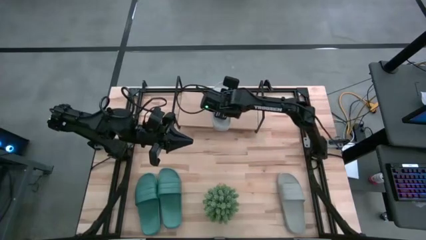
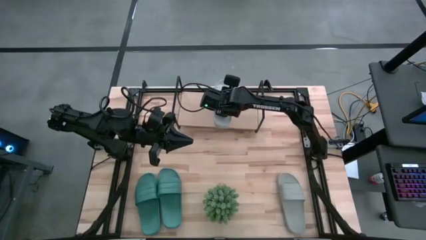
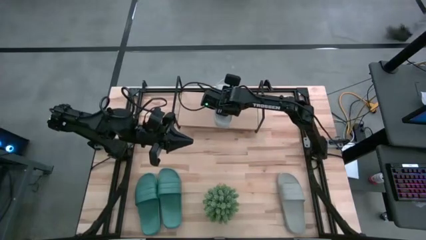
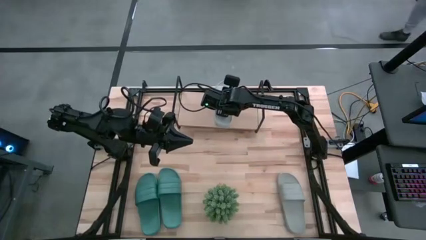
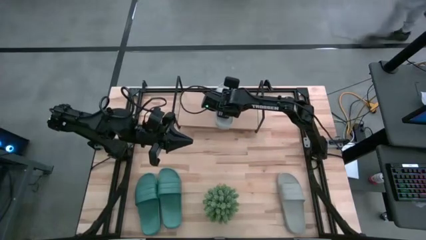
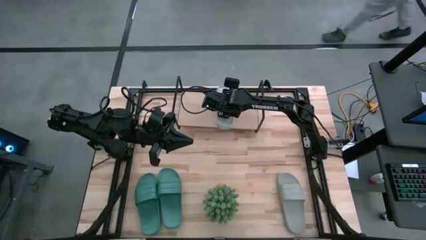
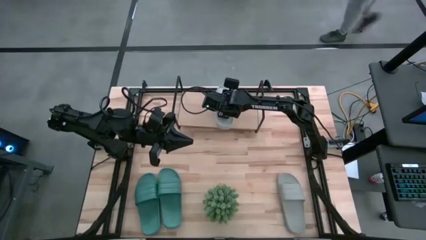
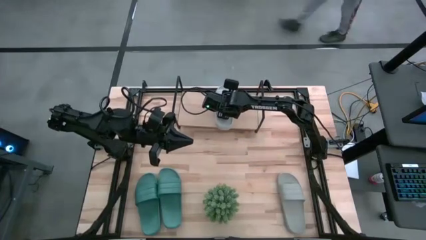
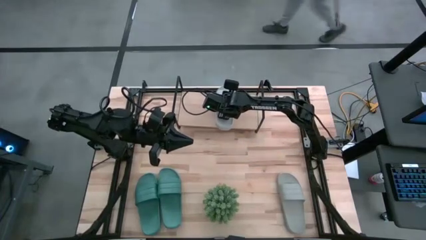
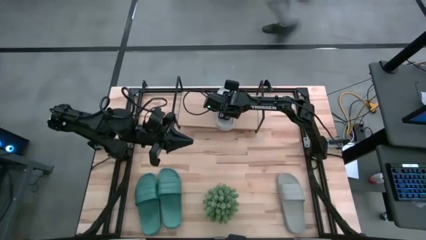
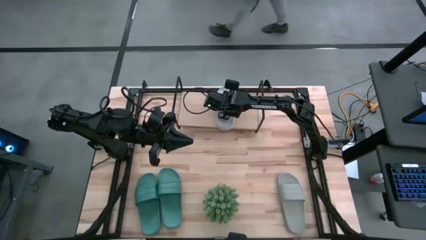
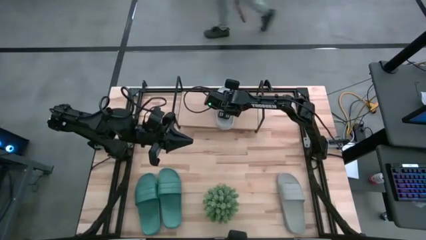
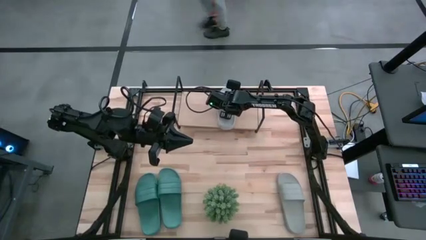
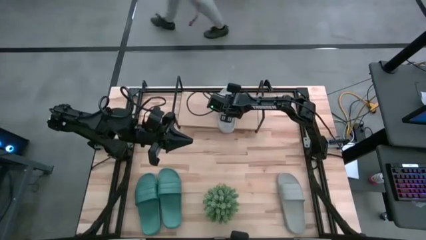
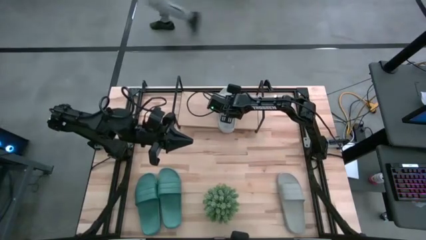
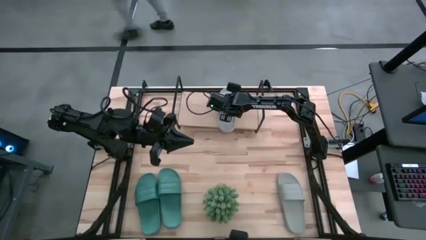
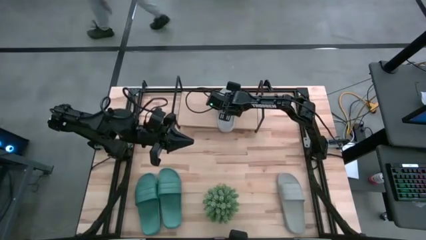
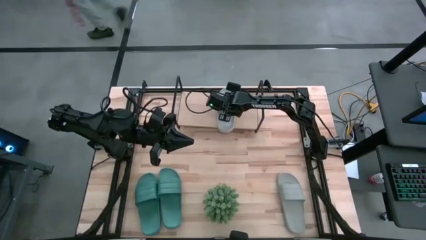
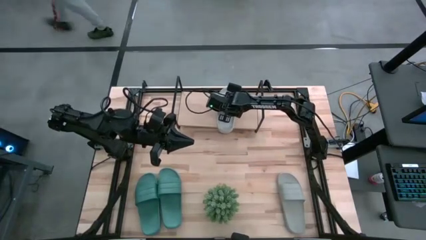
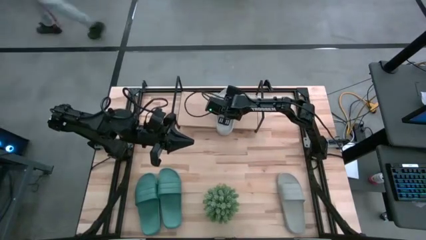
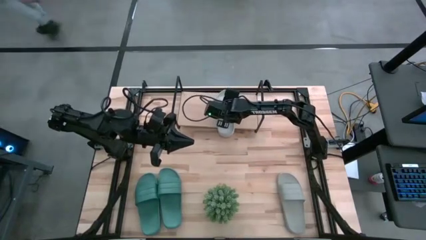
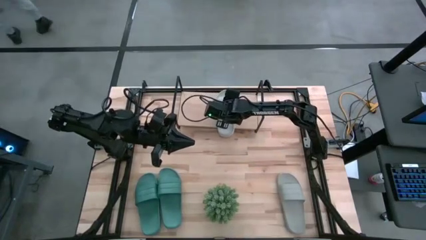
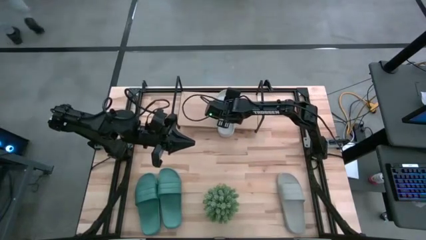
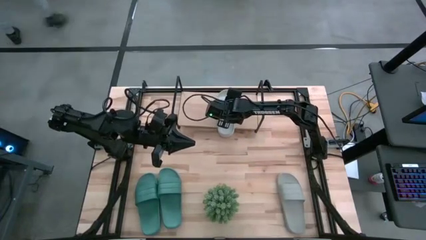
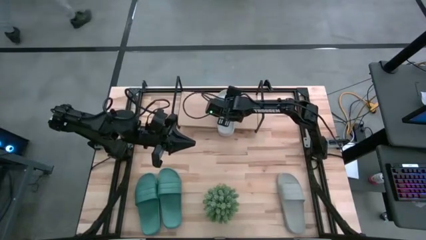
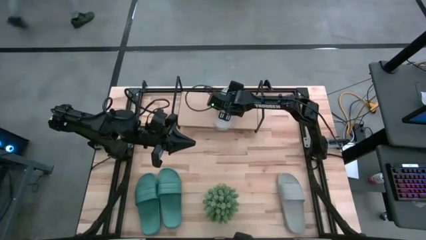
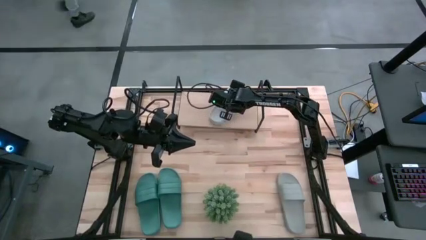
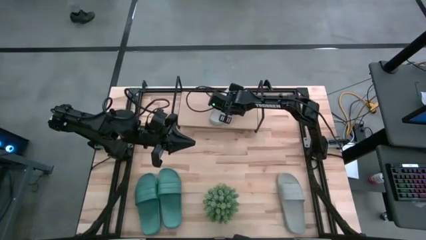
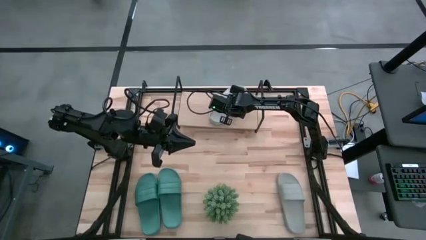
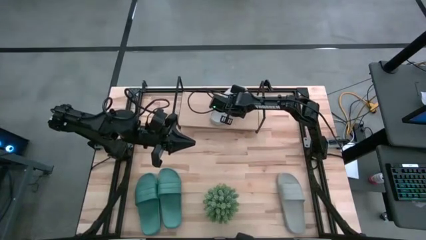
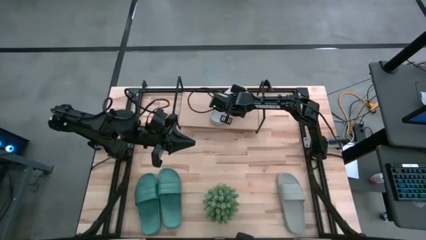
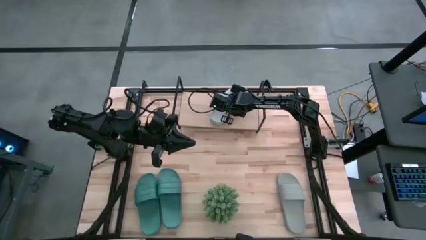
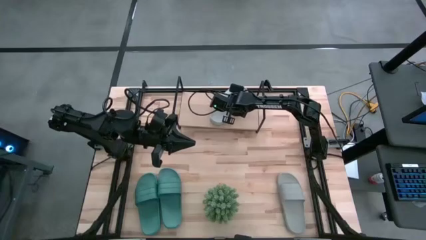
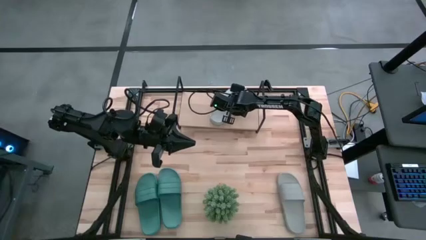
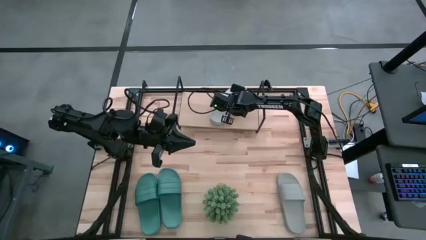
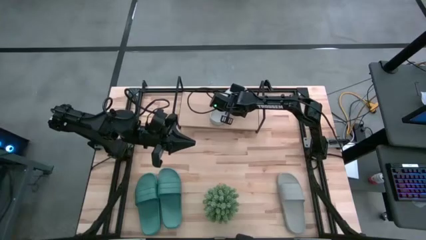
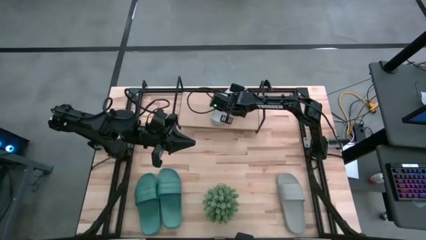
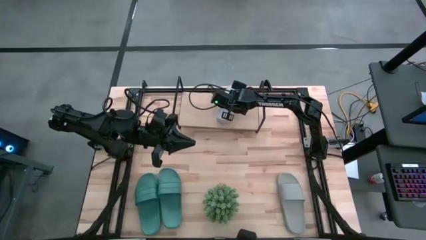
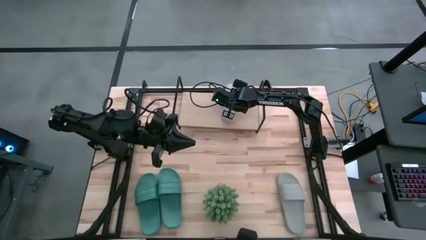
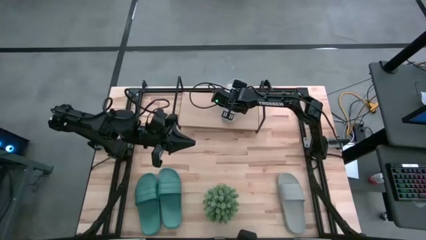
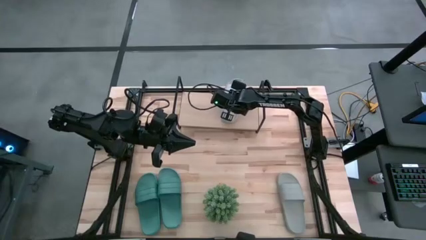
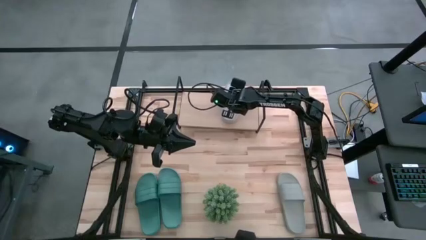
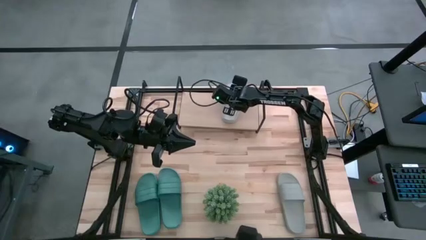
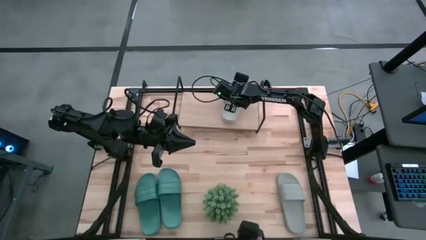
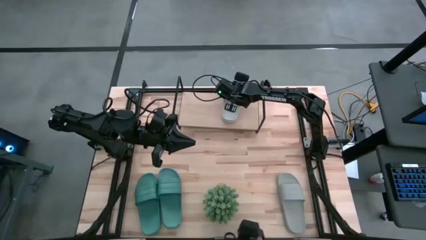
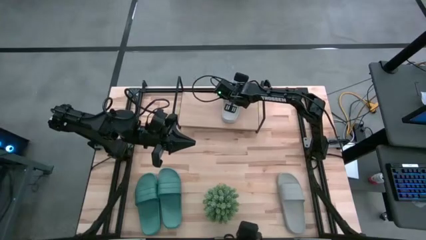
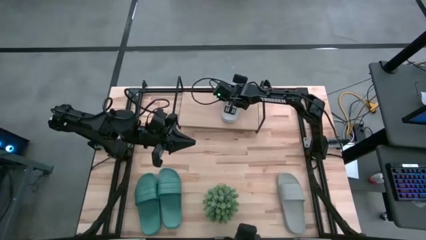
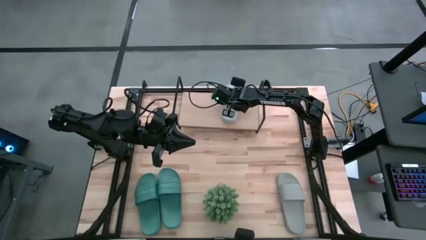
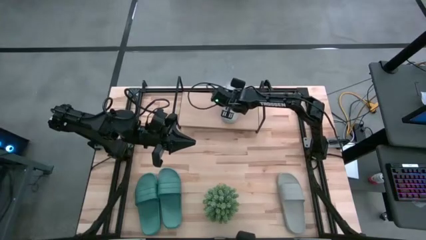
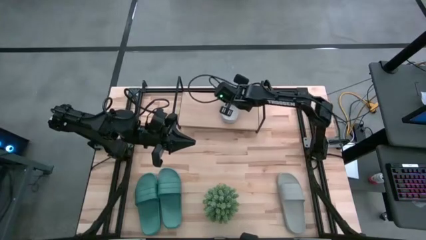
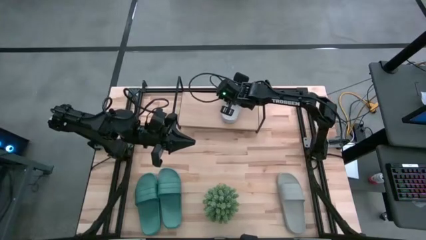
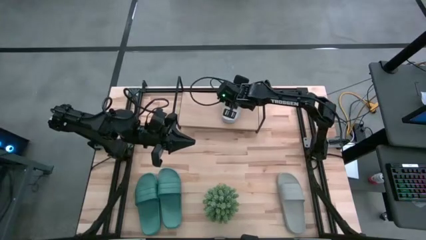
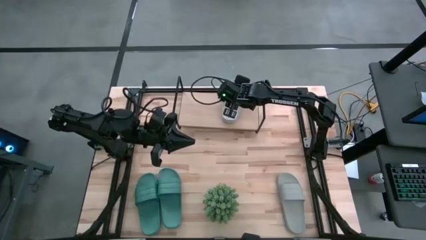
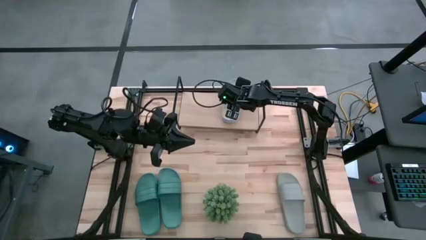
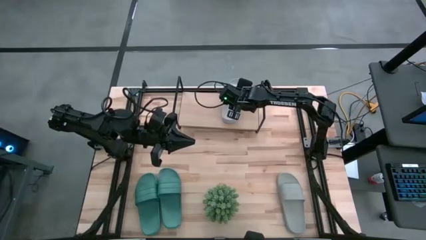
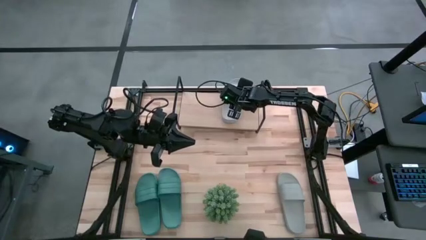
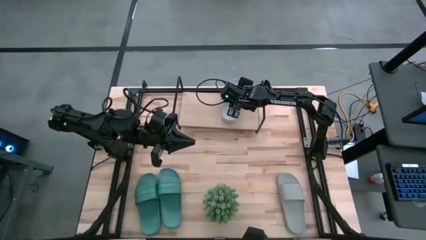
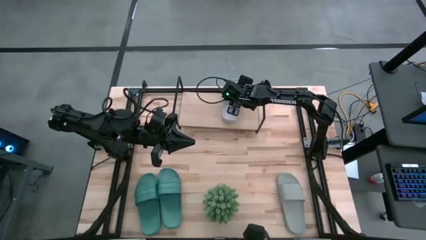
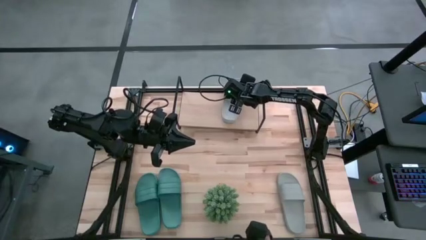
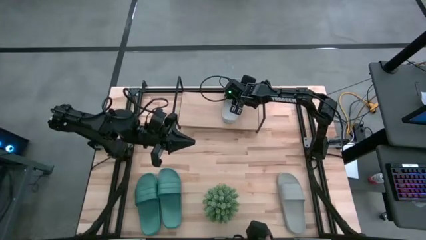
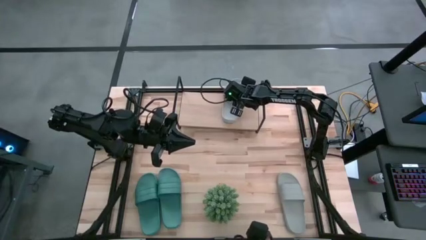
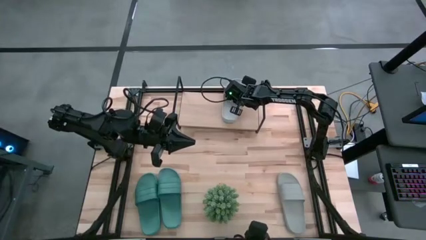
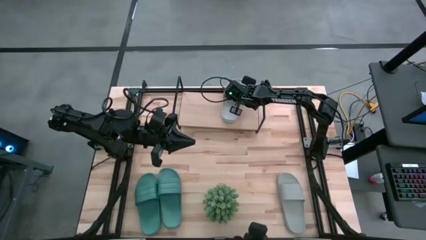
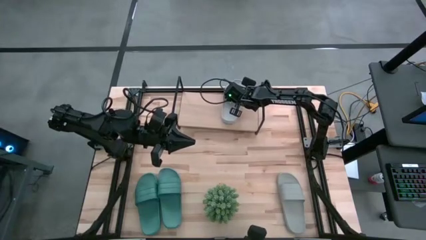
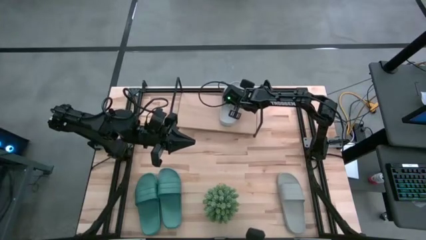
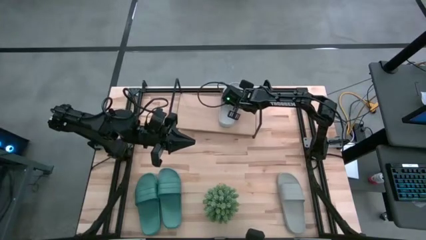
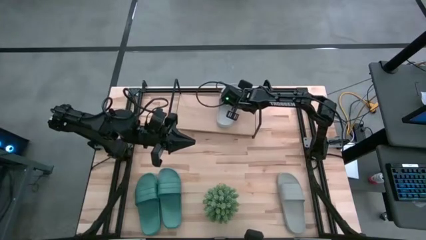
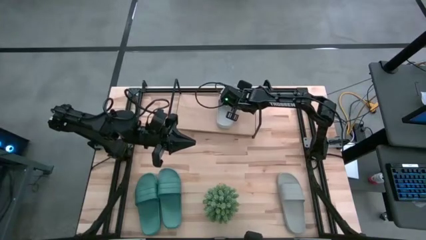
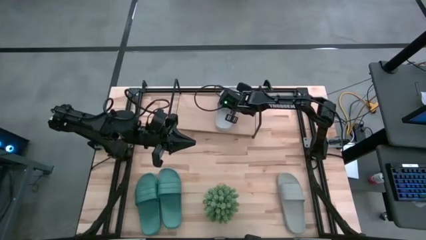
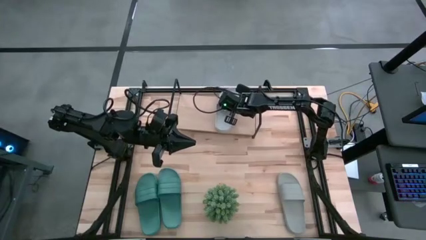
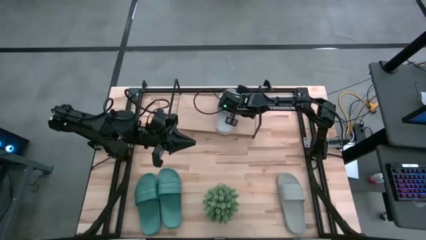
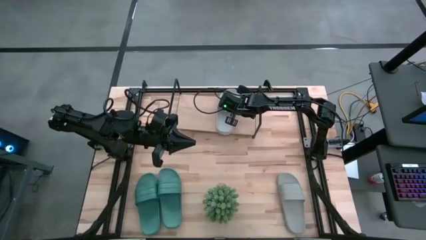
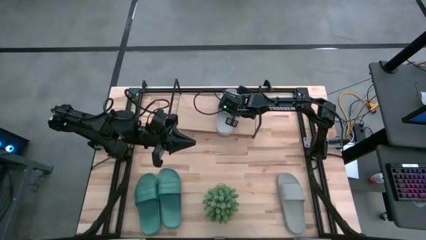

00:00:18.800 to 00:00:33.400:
Task: Pick and place slides into the shelf
Put the left gray slipper on the shelf
